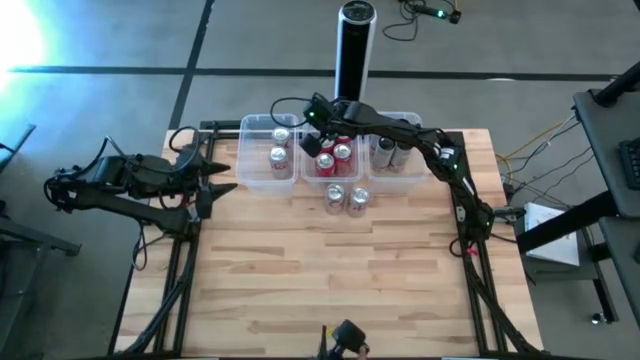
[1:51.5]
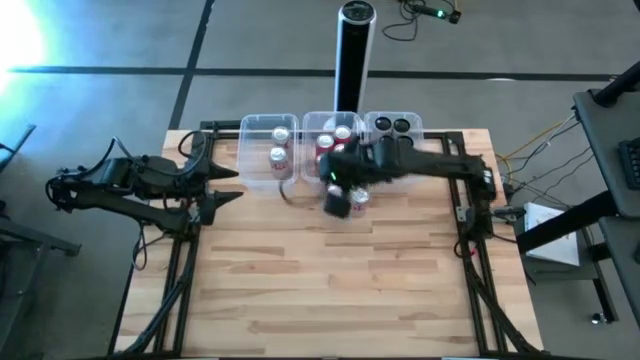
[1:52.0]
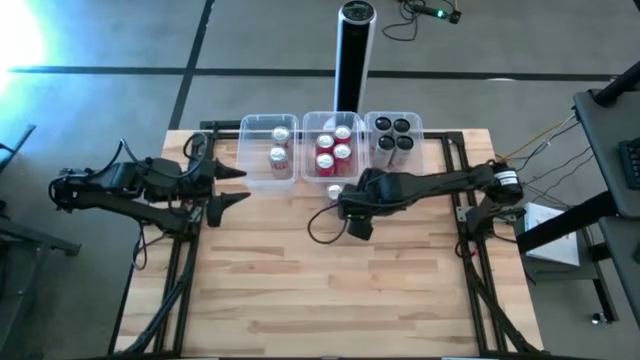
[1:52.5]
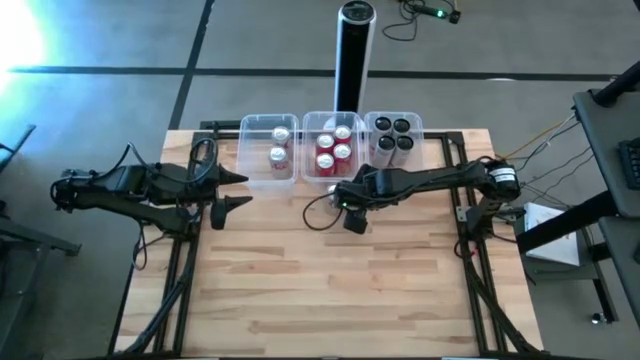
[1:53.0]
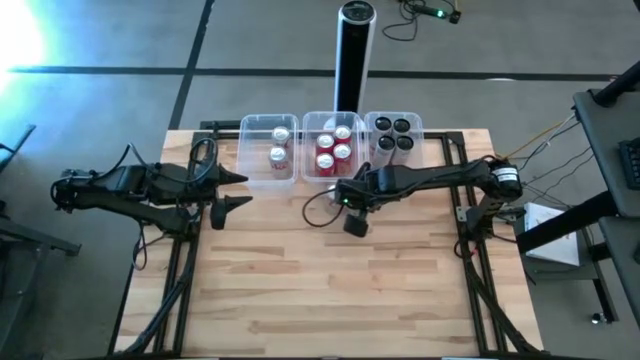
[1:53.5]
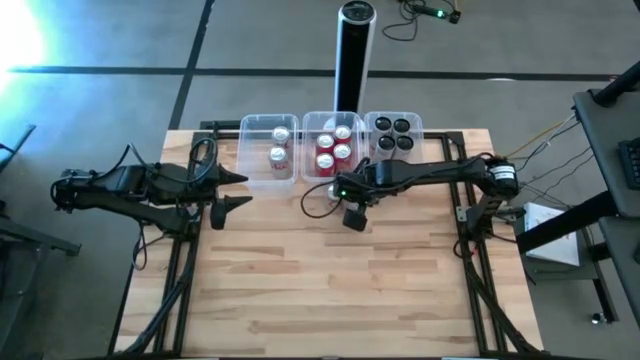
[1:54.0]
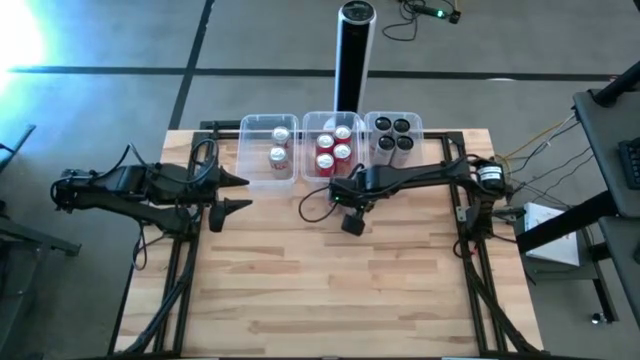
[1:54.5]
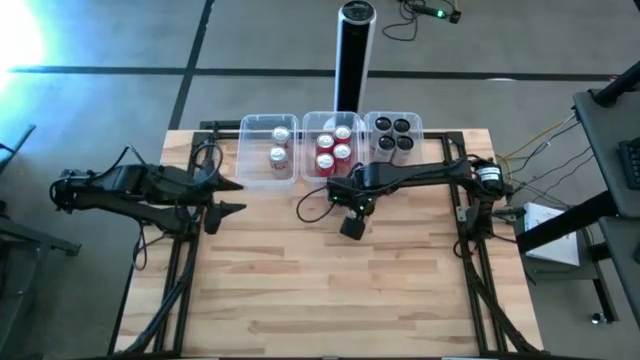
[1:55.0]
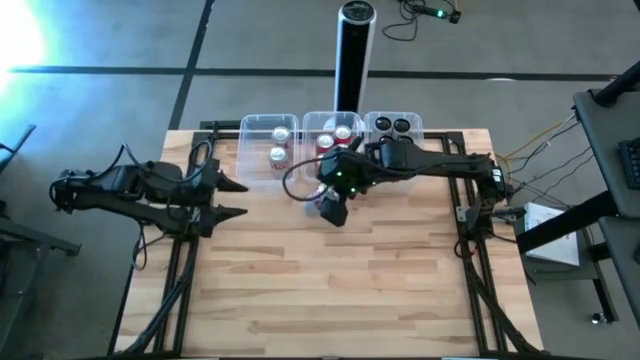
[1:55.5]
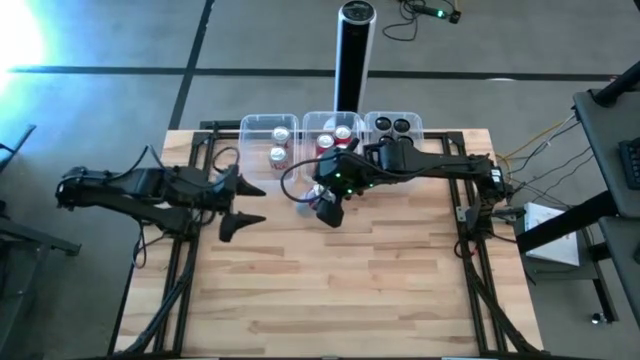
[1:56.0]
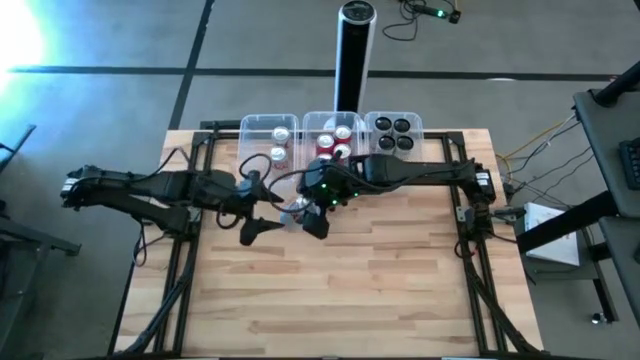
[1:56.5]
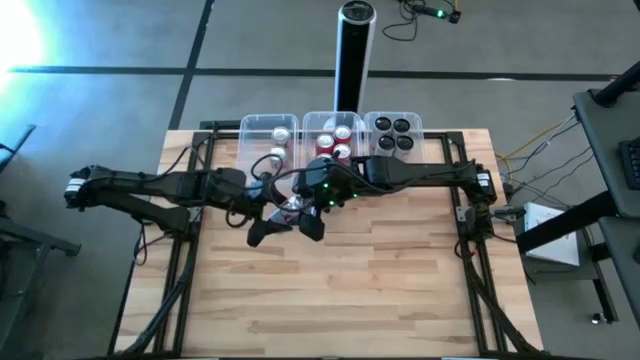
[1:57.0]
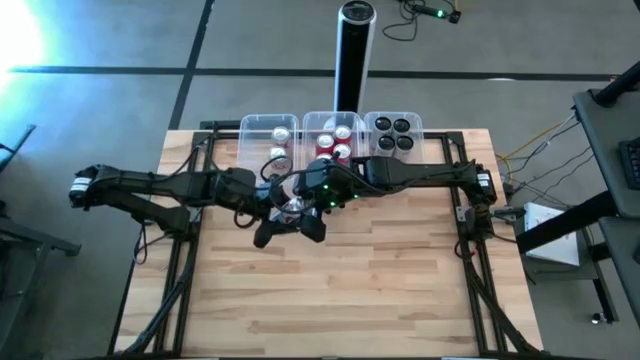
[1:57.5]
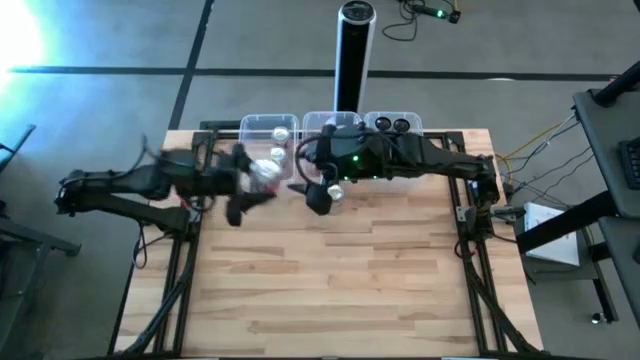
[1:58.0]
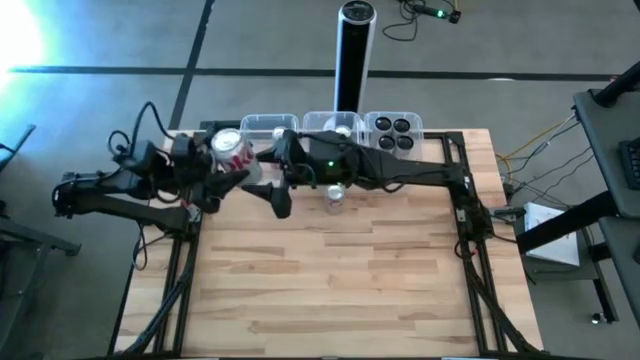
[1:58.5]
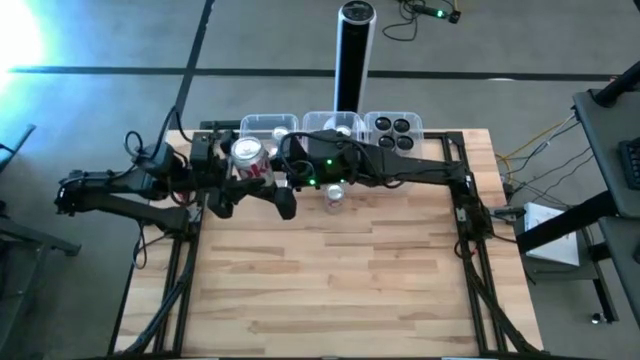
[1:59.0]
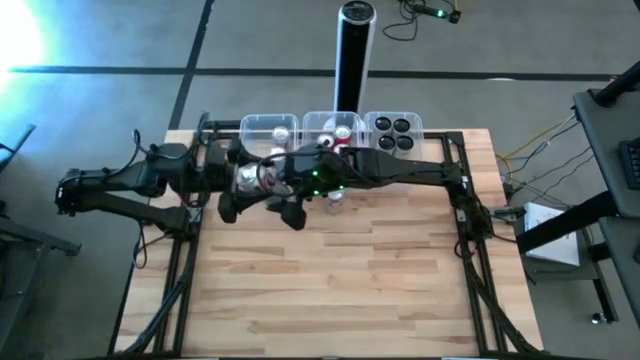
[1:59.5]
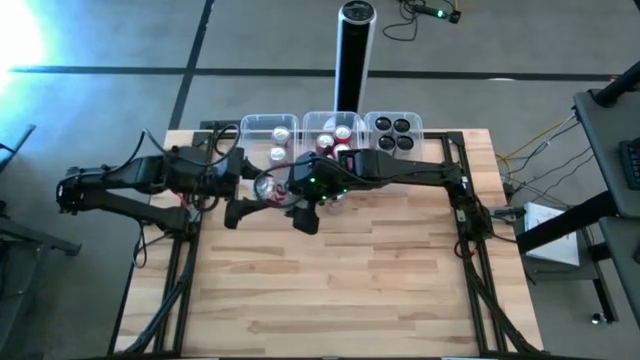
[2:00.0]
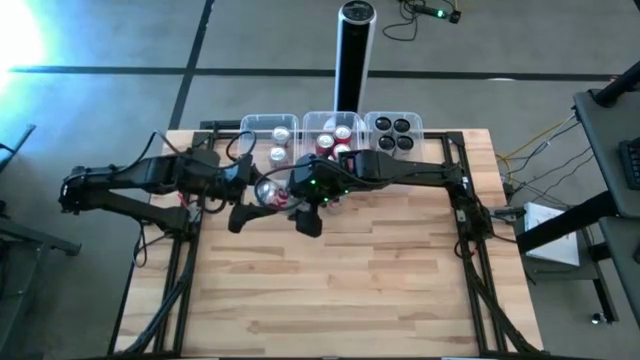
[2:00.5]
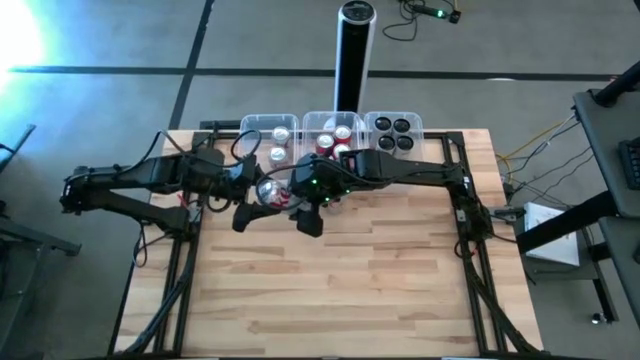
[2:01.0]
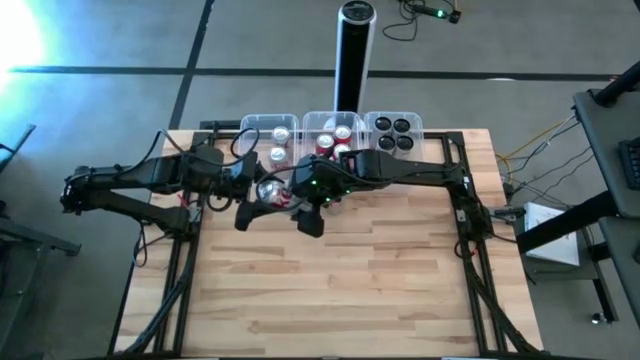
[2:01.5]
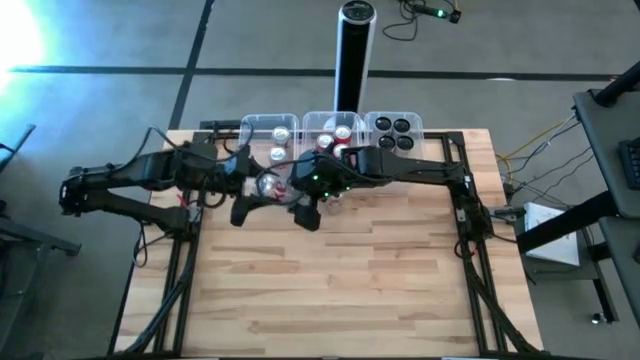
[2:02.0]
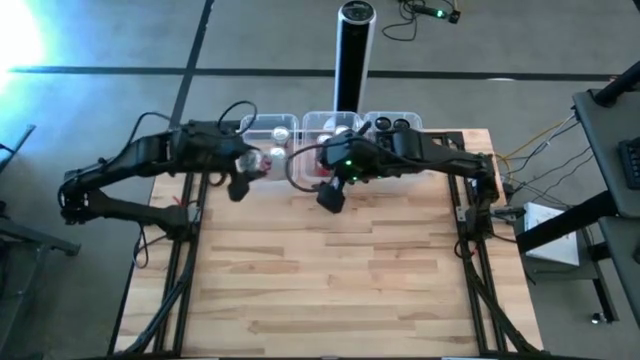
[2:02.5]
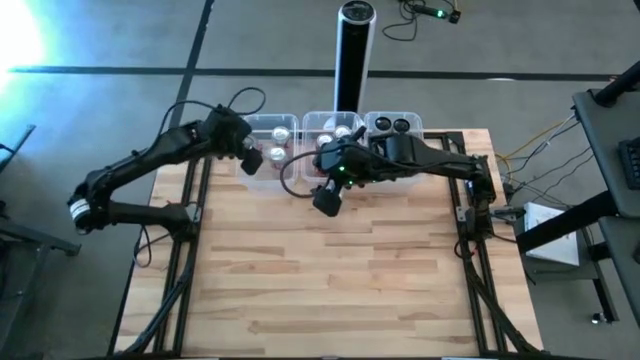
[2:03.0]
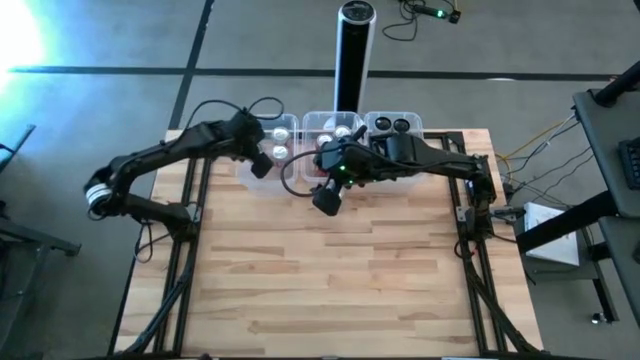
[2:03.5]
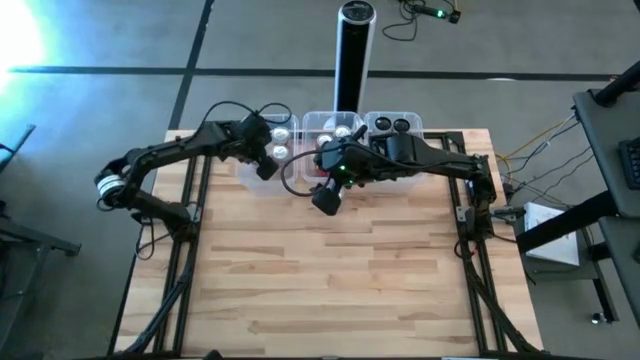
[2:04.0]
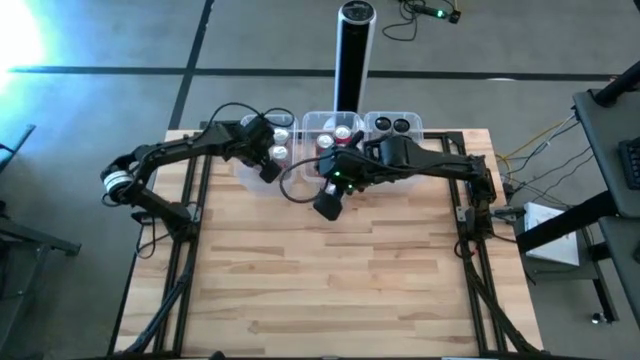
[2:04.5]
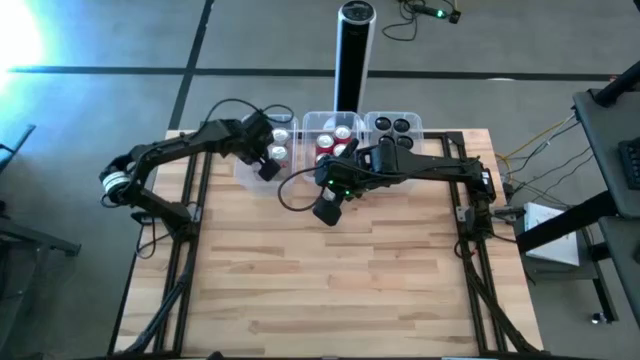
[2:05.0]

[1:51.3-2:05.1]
Task: Sort soda cans
Put the right white soda can into the left transparent bin

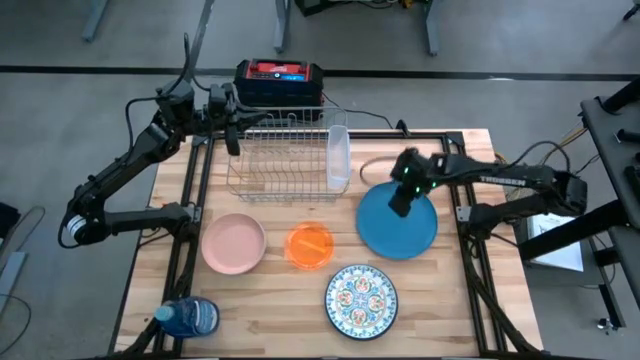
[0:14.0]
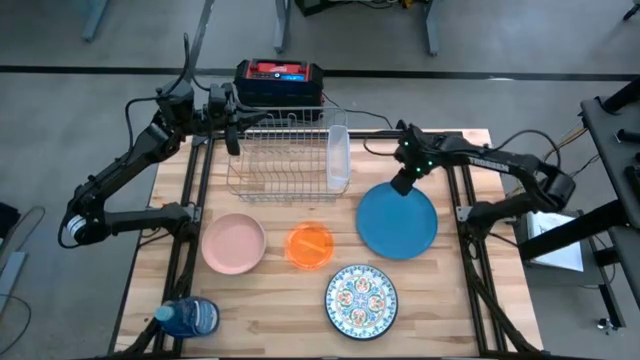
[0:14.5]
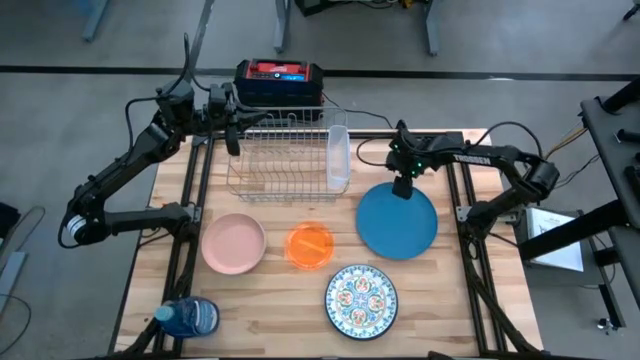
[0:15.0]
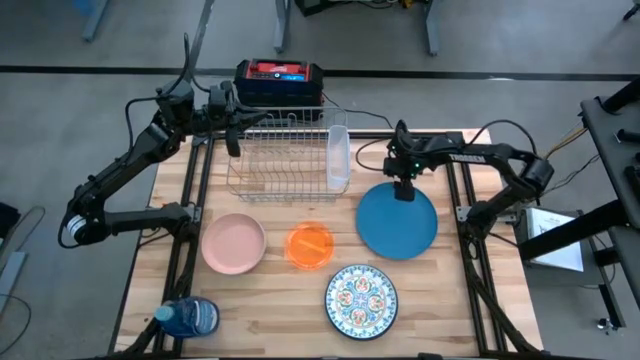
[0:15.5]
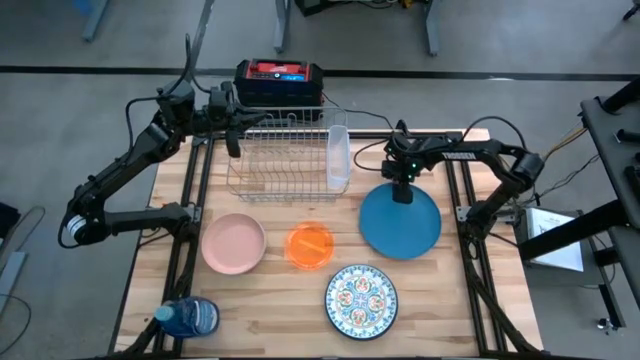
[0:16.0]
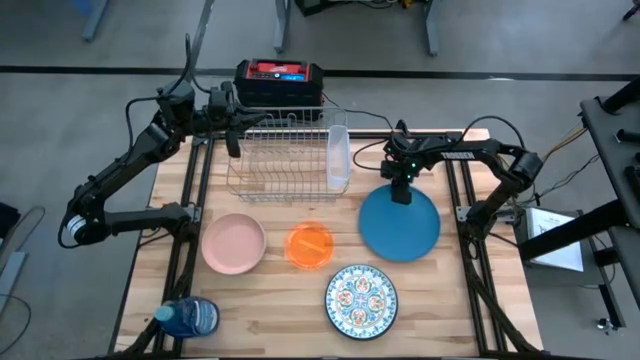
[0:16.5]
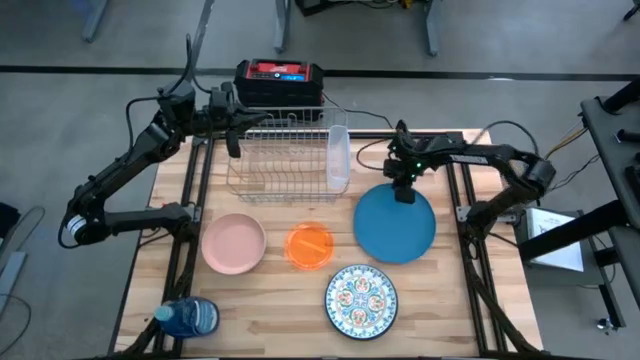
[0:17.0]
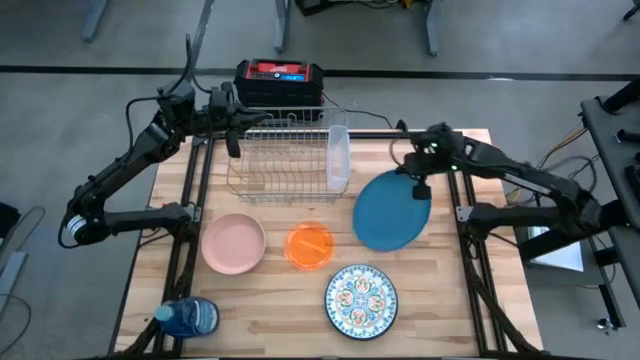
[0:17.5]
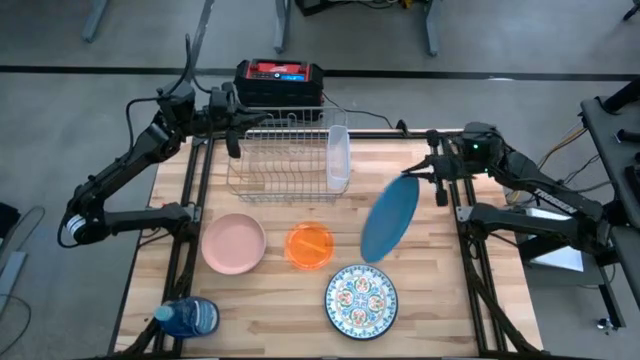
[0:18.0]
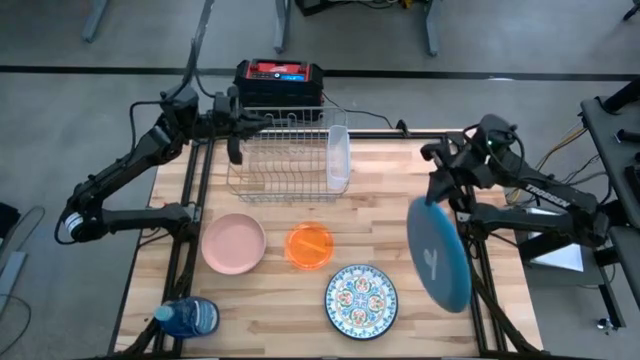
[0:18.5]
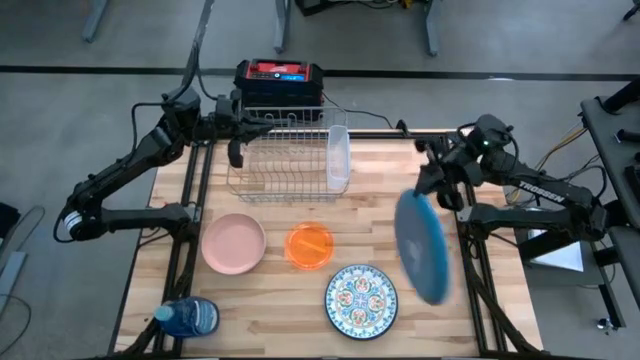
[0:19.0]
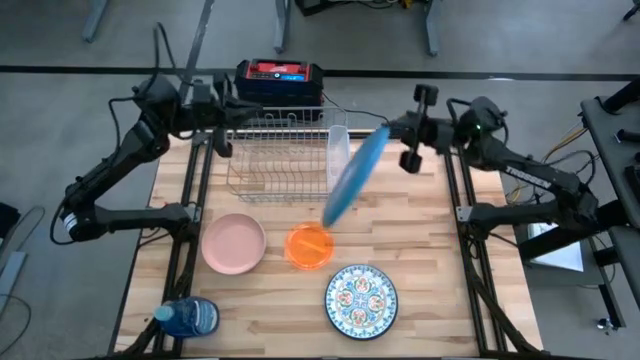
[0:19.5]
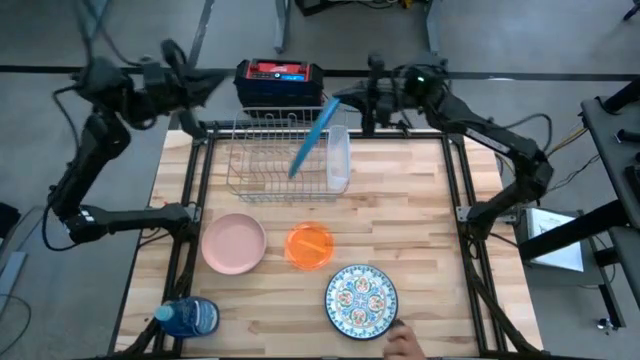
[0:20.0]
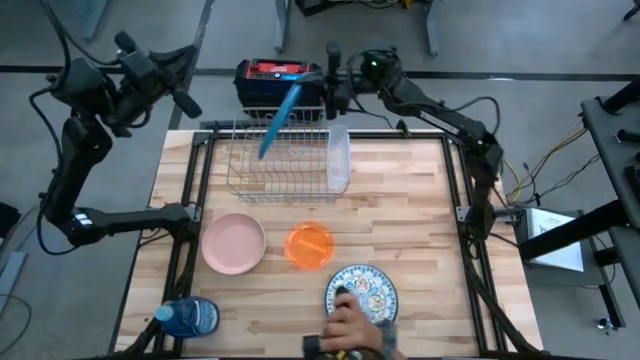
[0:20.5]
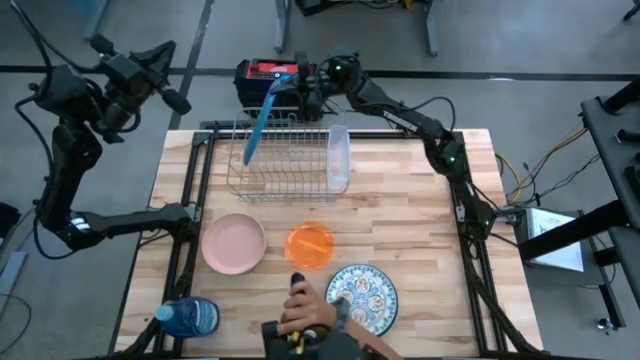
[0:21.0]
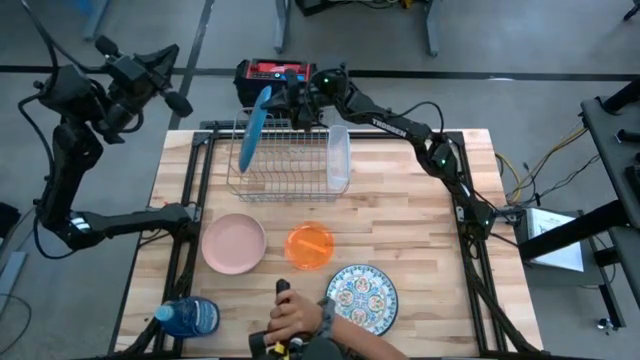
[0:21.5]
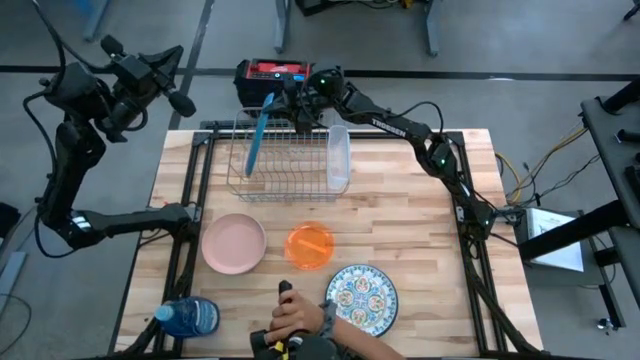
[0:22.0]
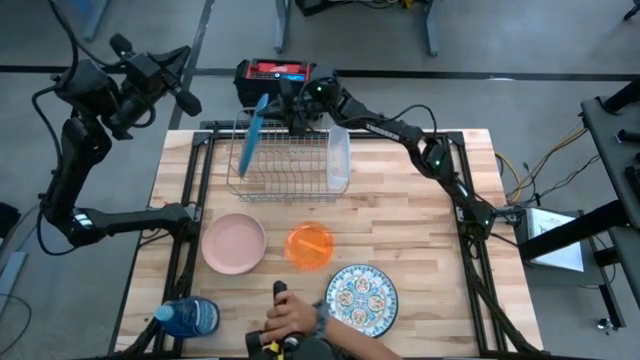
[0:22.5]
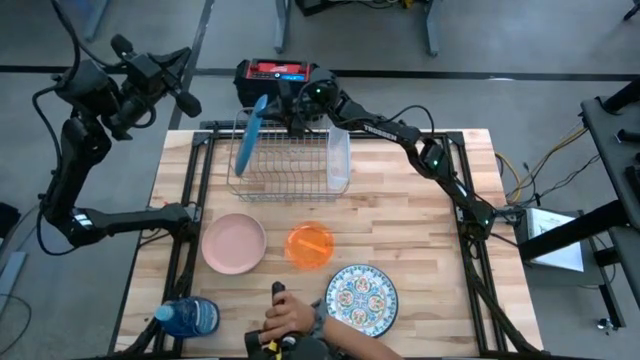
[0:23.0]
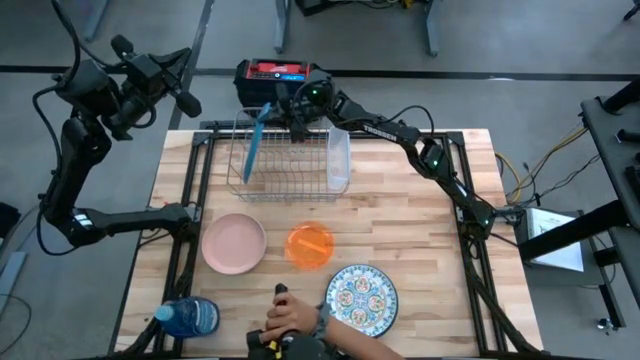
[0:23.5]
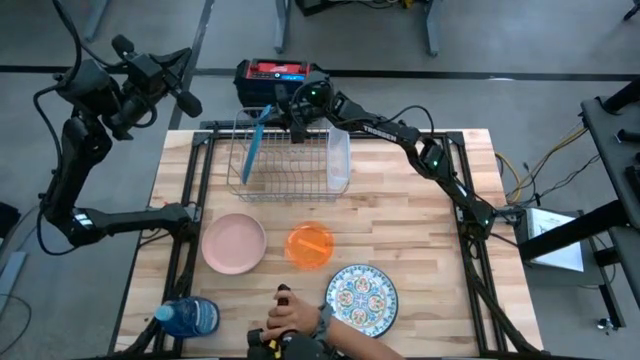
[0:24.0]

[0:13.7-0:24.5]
Task: Sort dishes
Put the blue plate in the dishwasher rack
